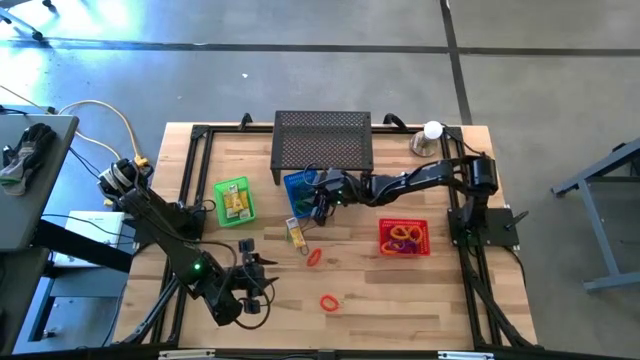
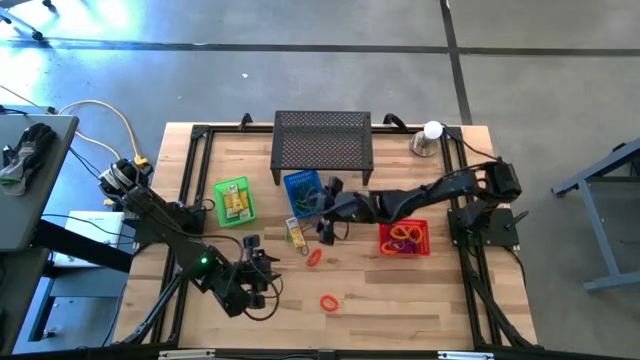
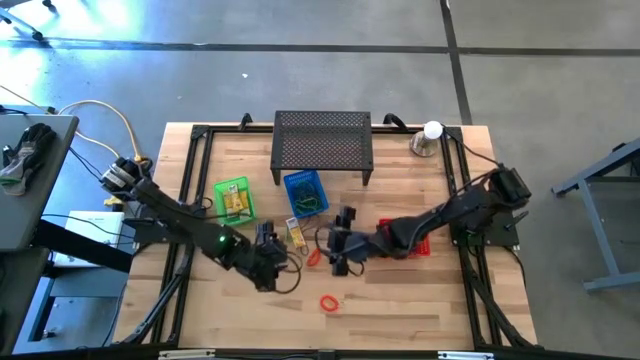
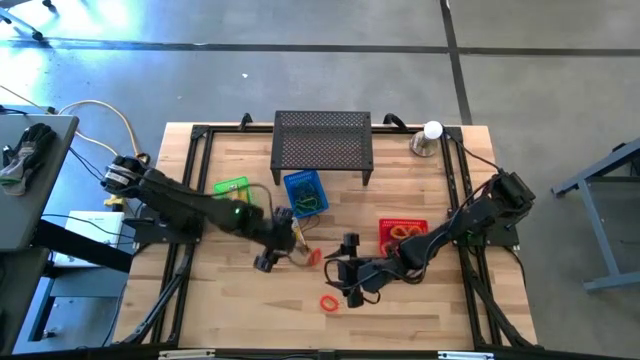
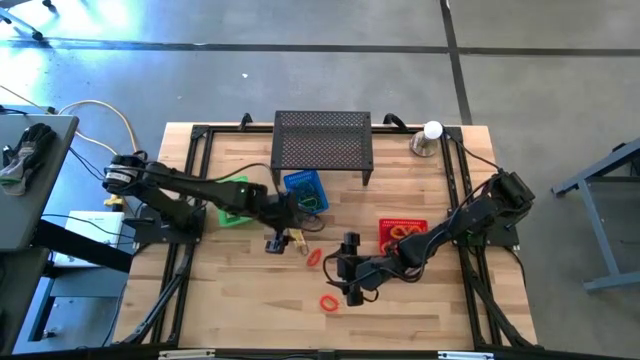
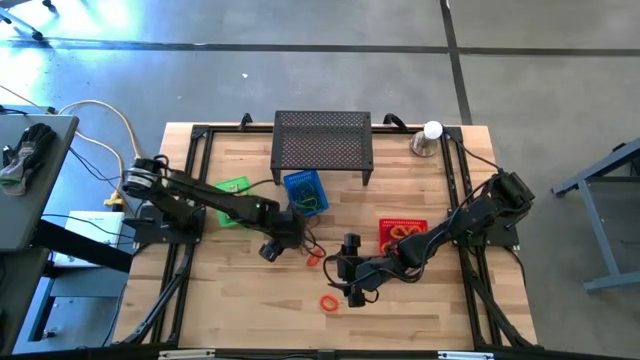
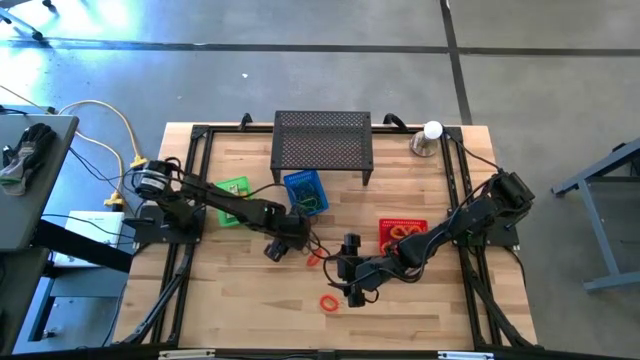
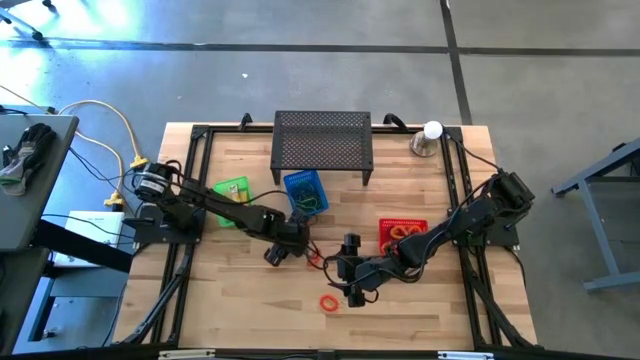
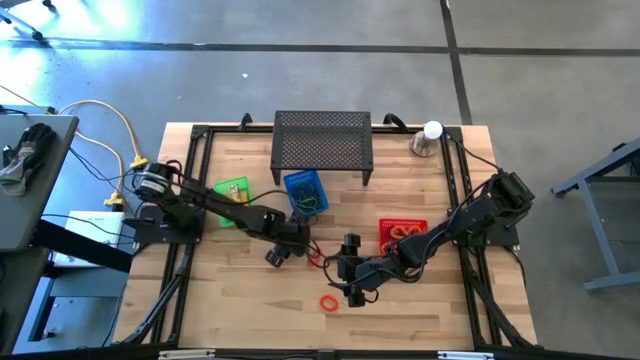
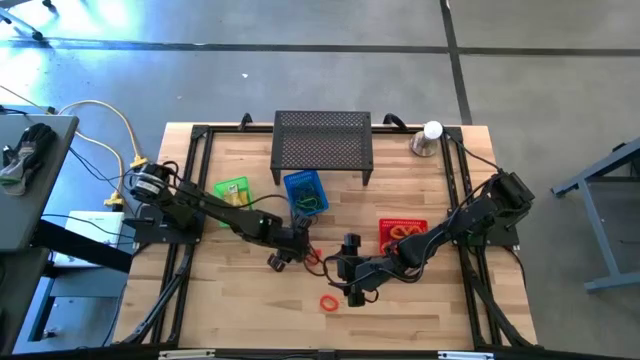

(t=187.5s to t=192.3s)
Task: Pick & Place Office Desk Supplies
Put the yellow crayon box into the green basket

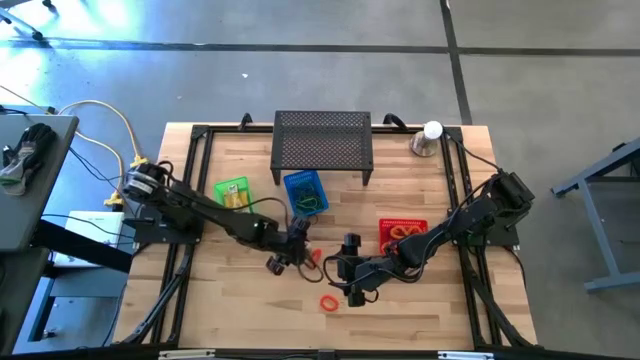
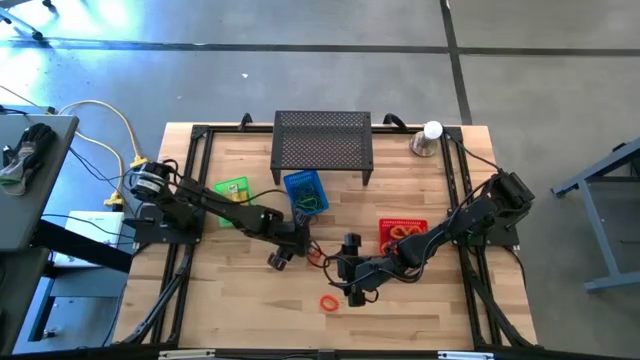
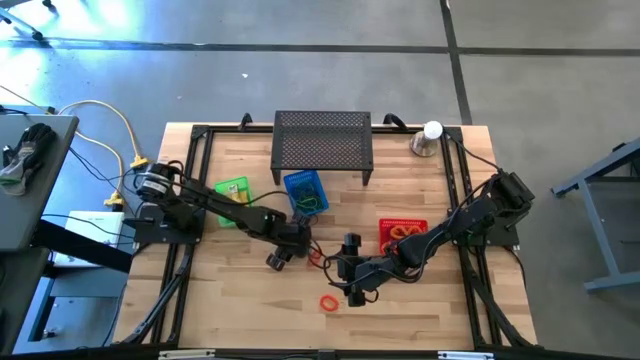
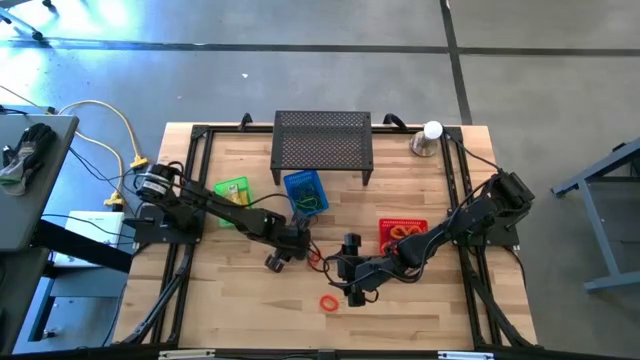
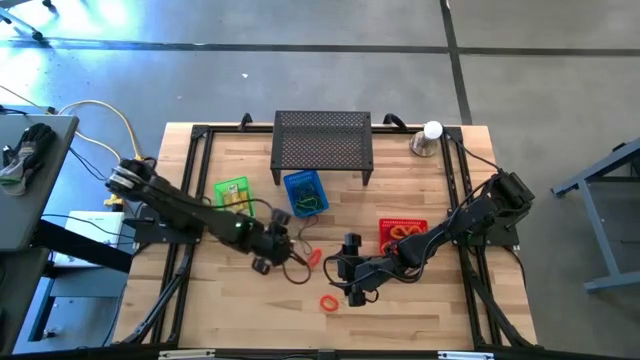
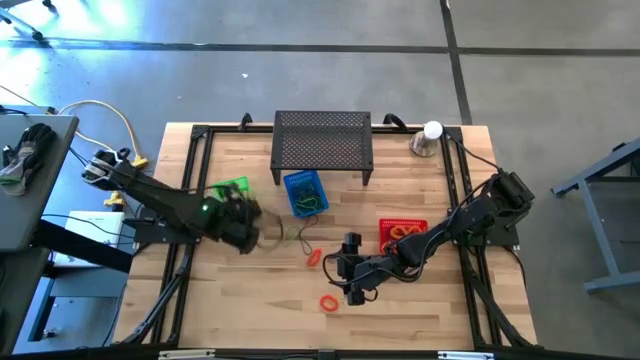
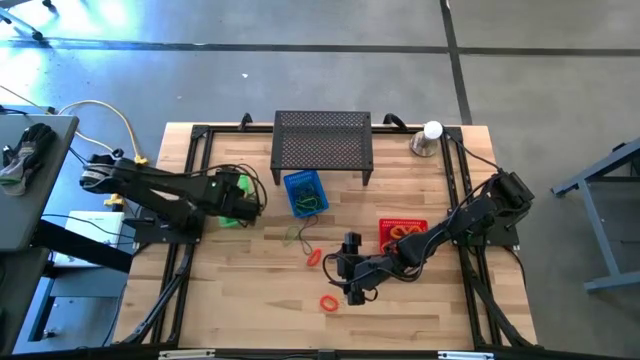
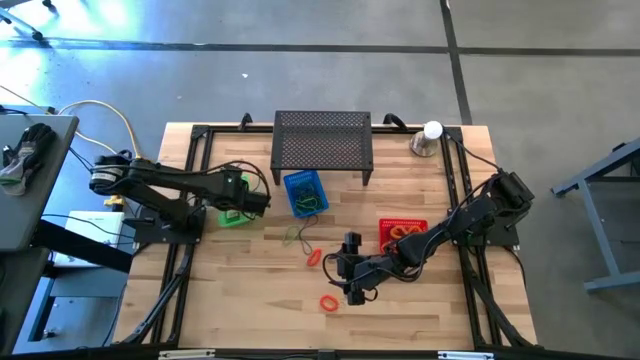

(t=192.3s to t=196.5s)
Put the yellow crayon box into the green basket

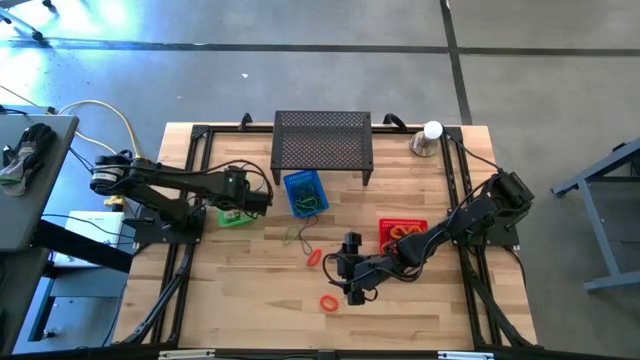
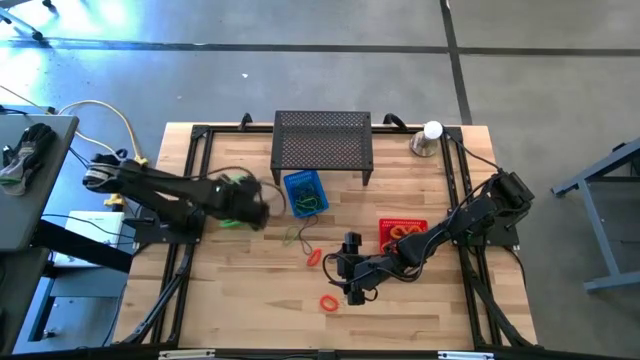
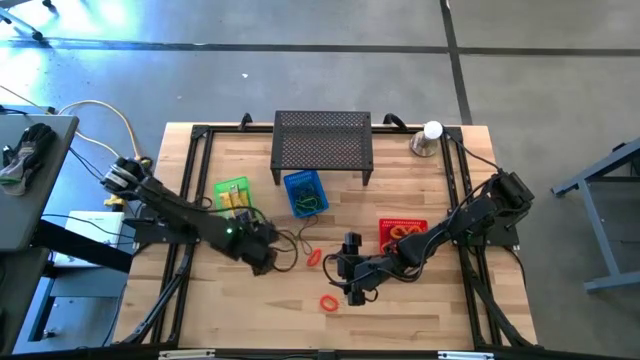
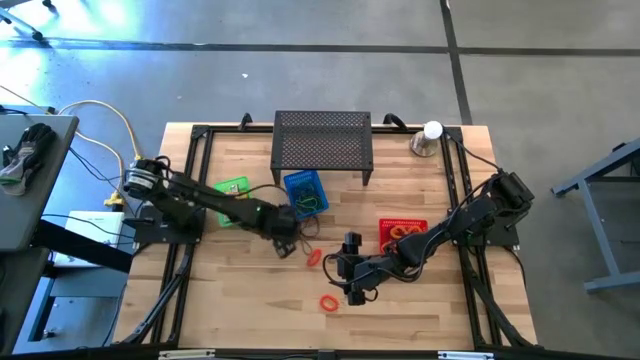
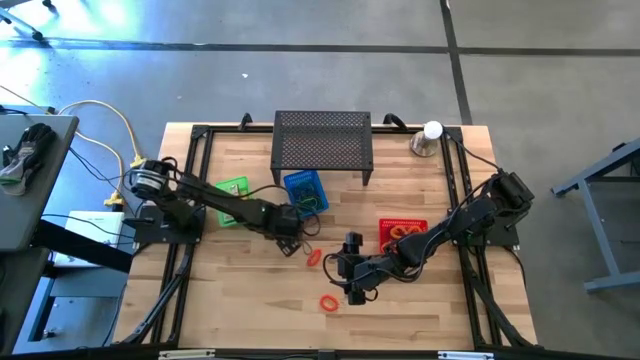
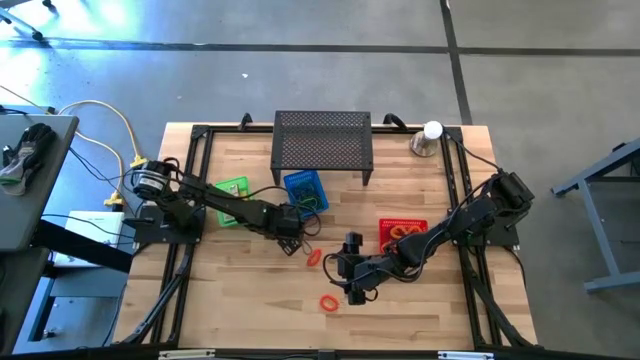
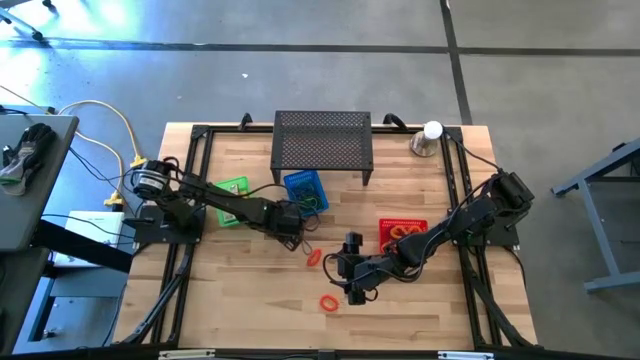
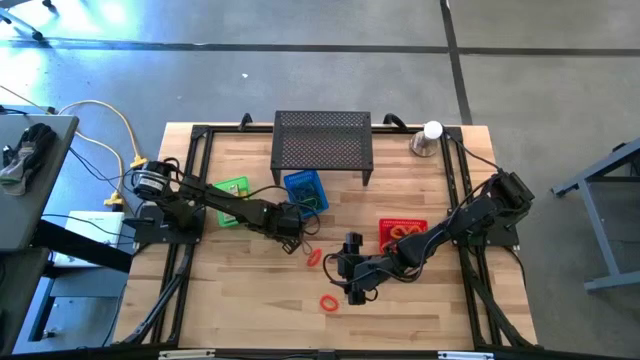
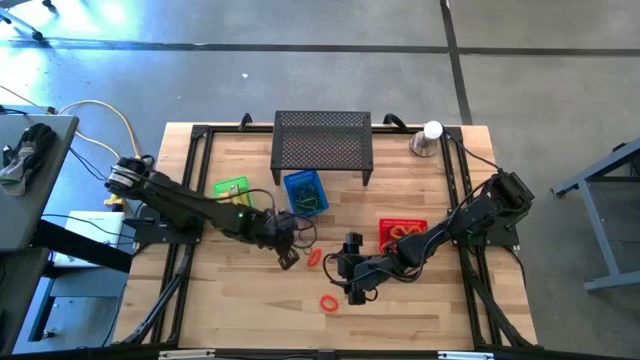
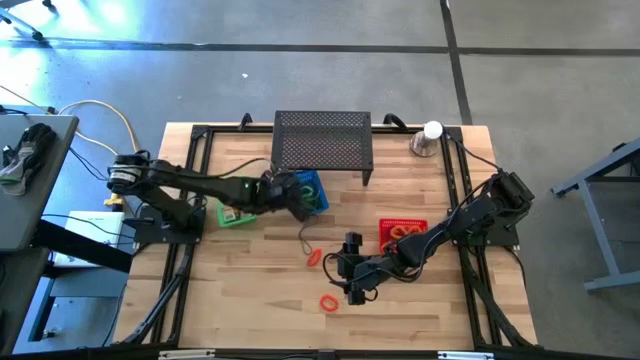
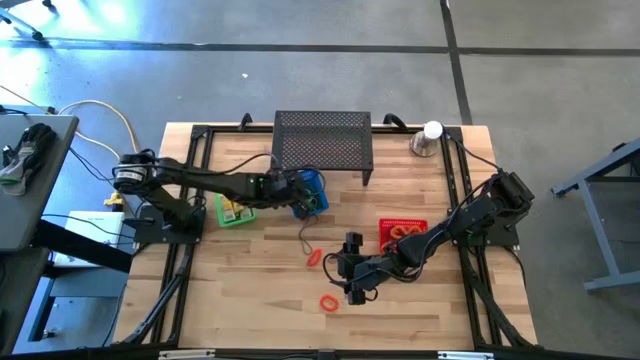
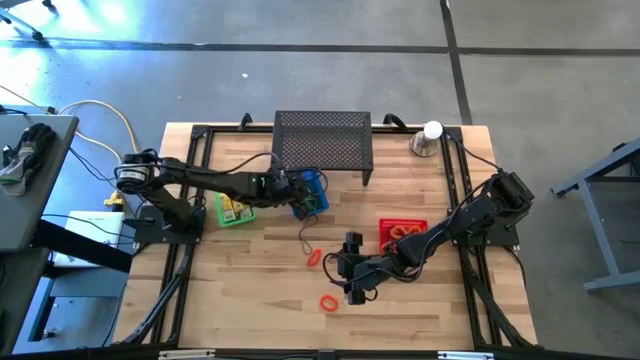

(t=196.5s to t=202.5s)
Put the green rubber band into the blue basket

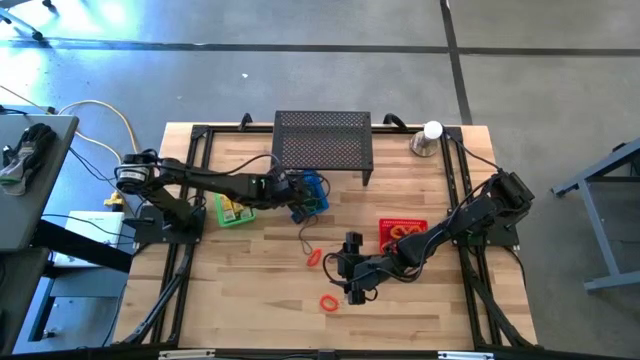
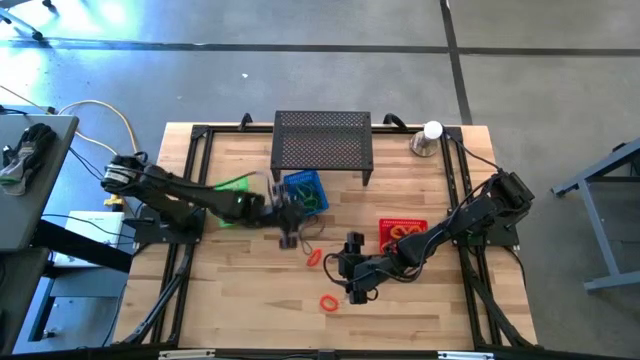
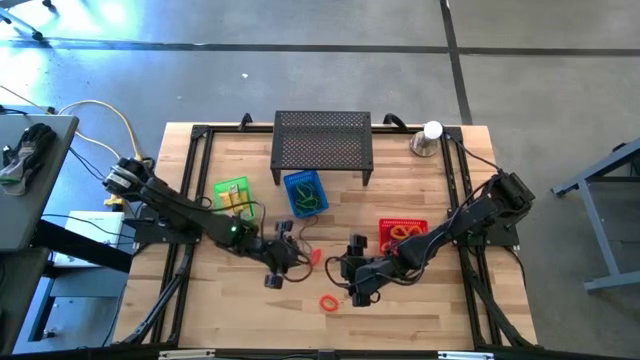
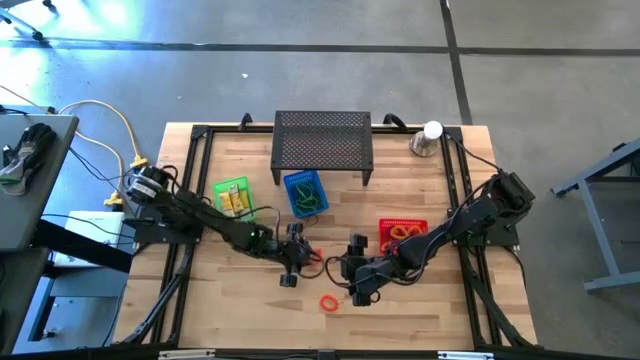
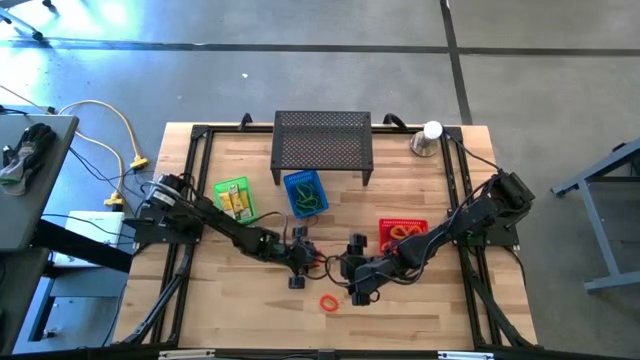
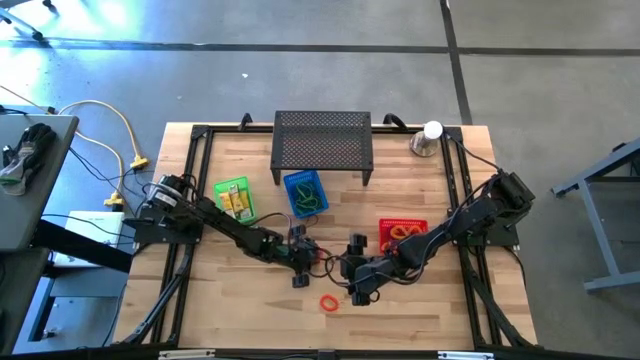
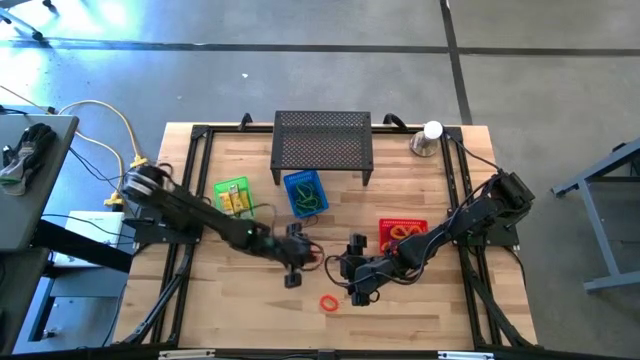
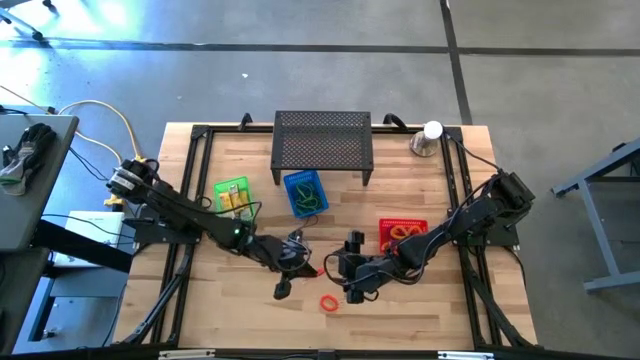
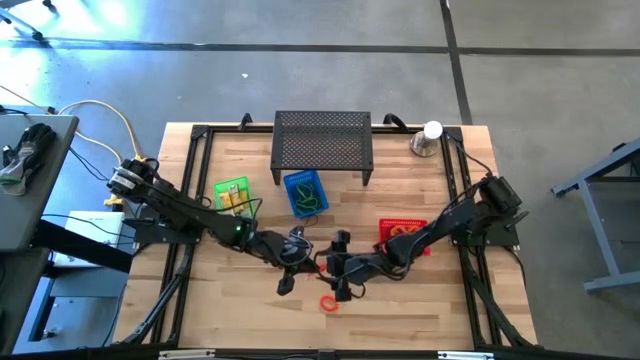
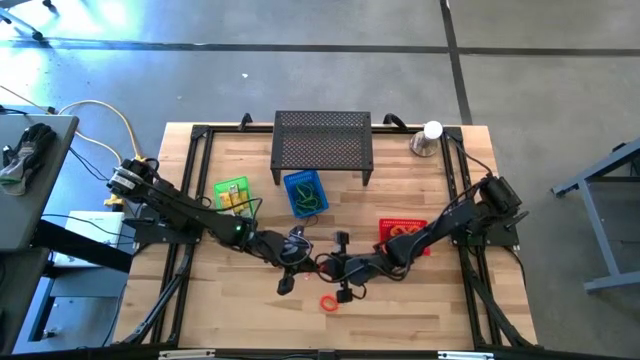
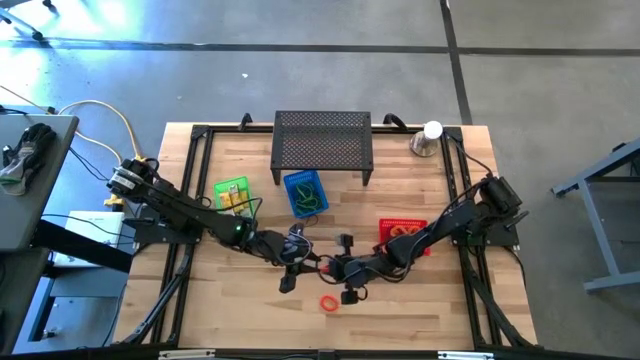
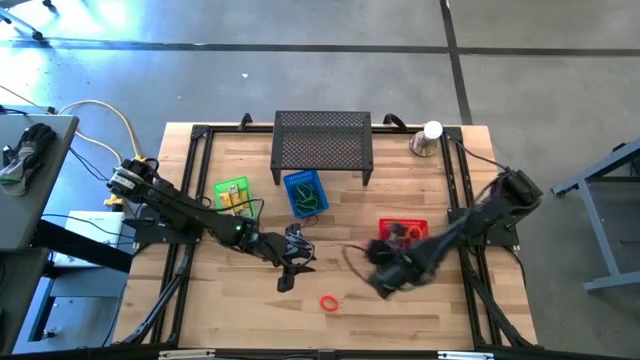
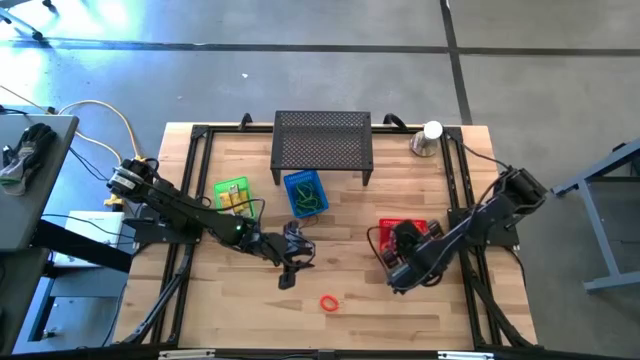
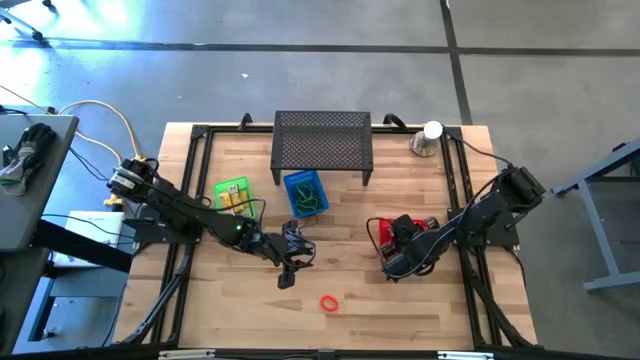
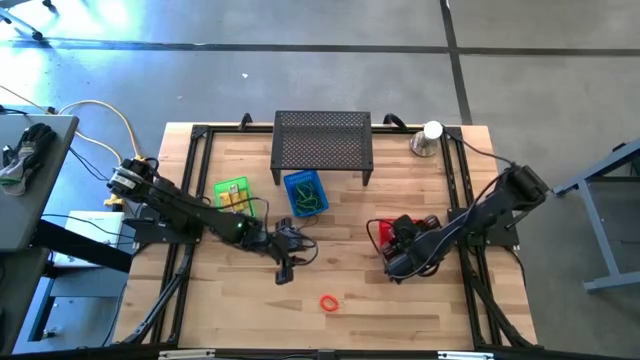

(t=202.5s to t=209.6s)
Put the red spring keychain into the red basket
